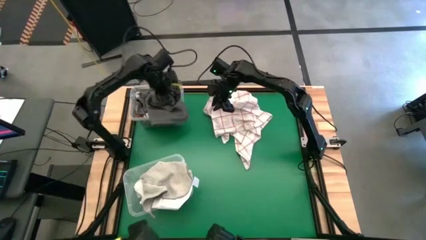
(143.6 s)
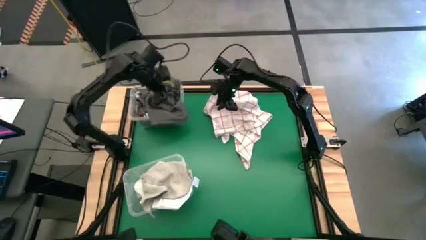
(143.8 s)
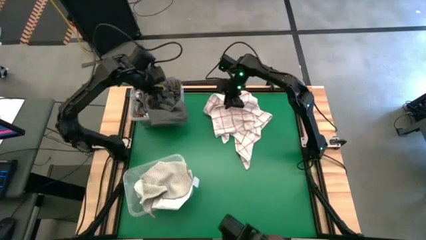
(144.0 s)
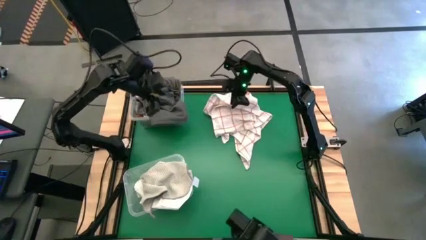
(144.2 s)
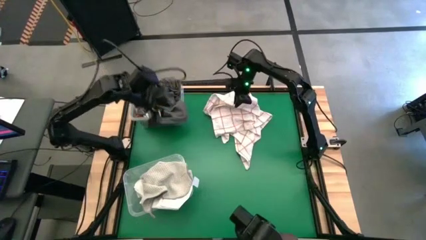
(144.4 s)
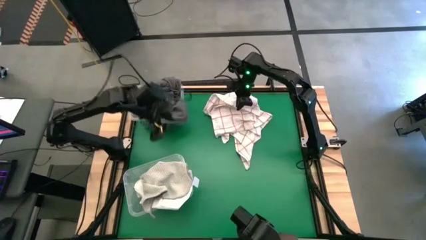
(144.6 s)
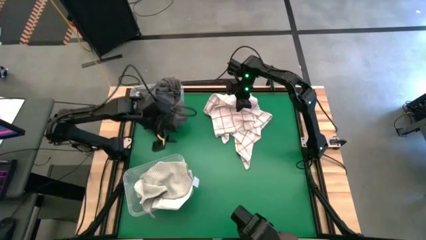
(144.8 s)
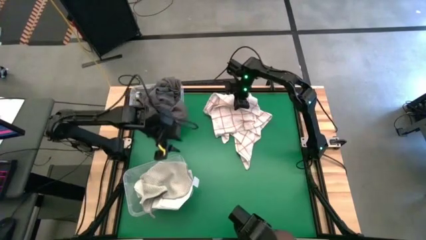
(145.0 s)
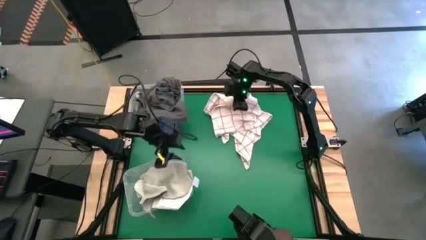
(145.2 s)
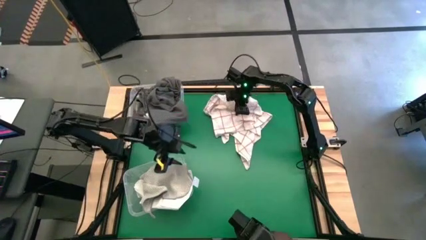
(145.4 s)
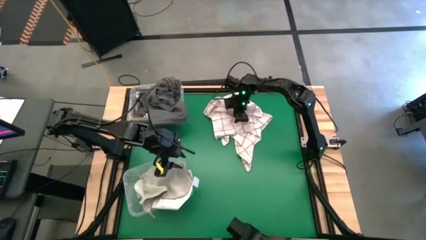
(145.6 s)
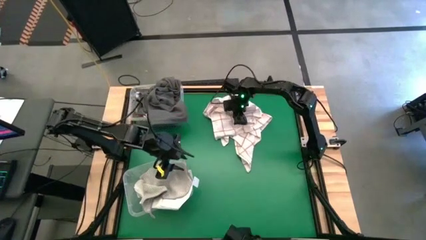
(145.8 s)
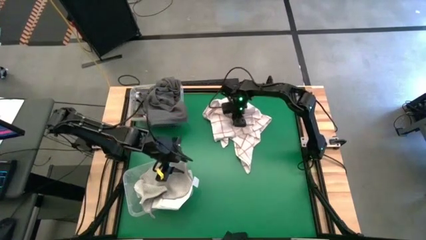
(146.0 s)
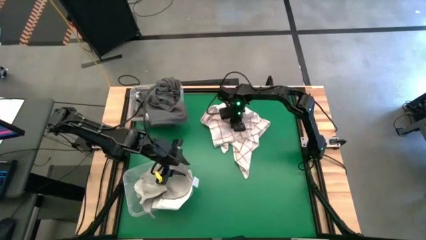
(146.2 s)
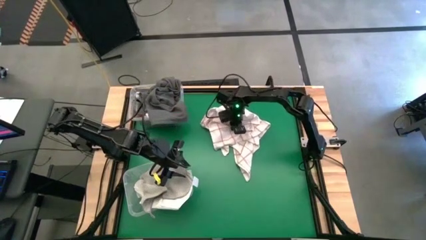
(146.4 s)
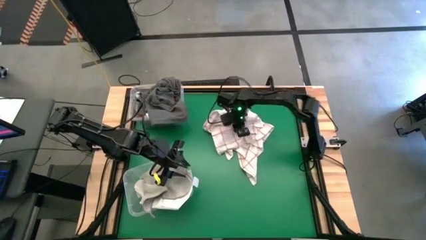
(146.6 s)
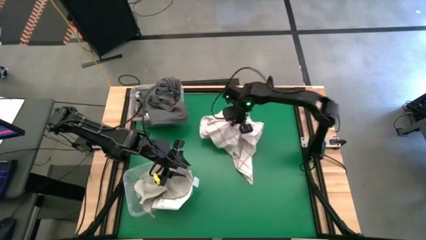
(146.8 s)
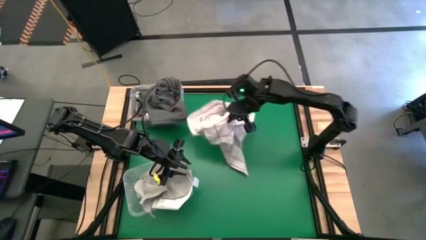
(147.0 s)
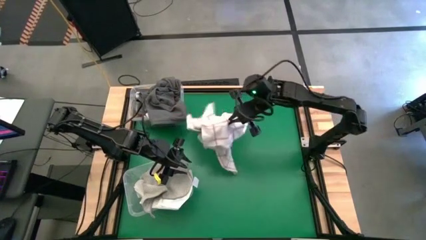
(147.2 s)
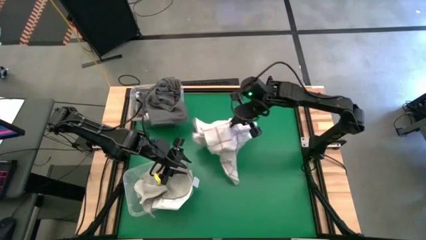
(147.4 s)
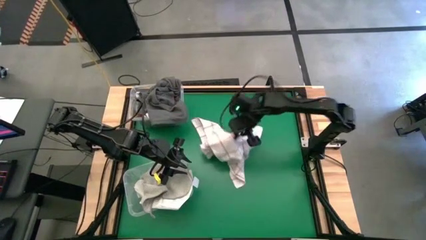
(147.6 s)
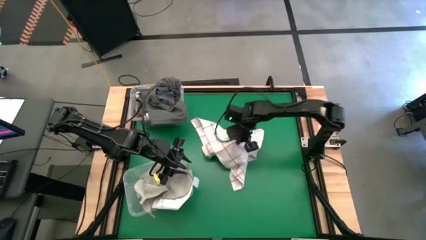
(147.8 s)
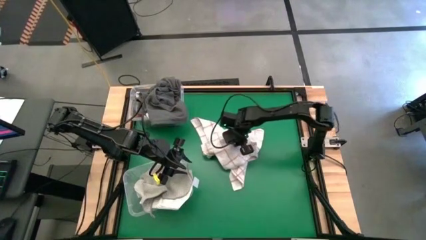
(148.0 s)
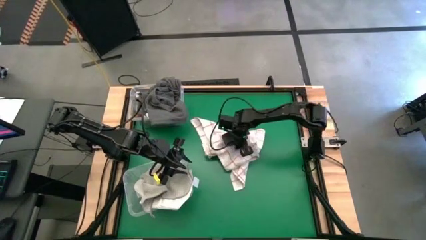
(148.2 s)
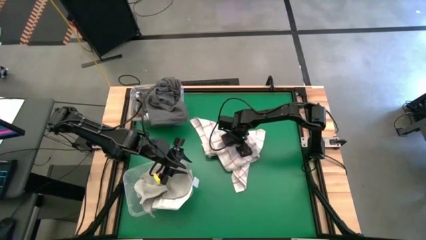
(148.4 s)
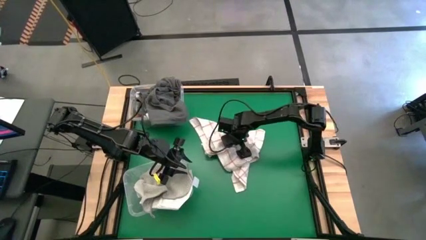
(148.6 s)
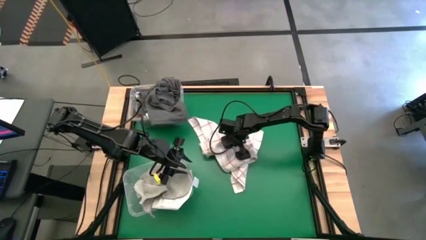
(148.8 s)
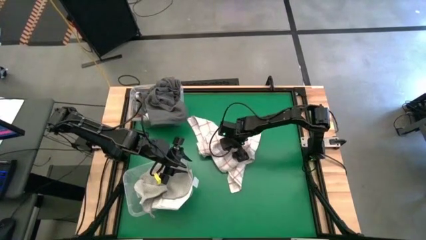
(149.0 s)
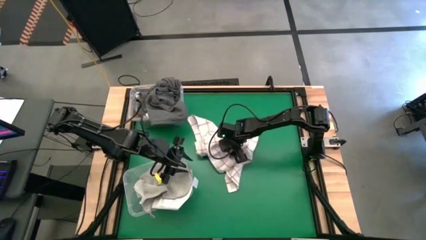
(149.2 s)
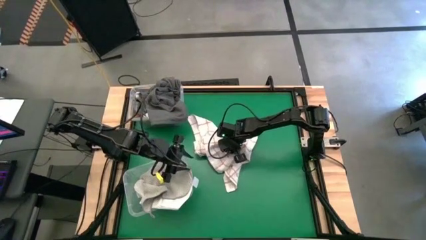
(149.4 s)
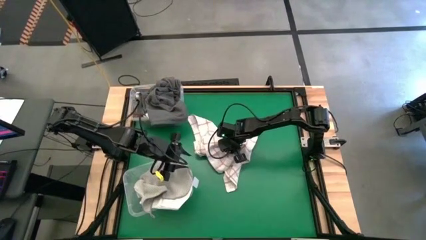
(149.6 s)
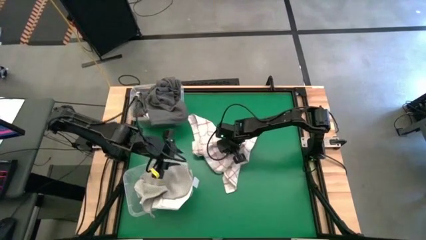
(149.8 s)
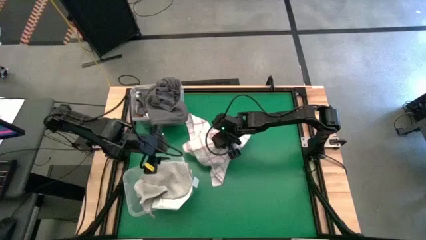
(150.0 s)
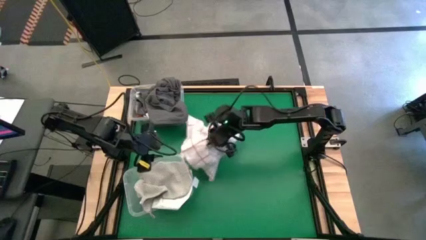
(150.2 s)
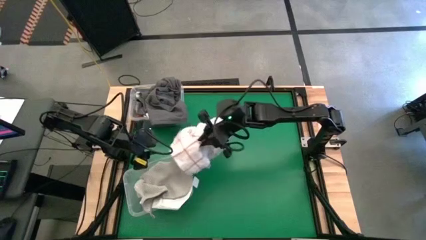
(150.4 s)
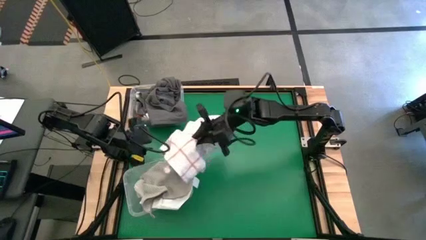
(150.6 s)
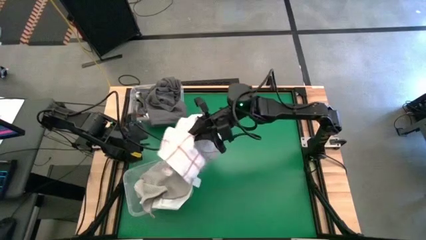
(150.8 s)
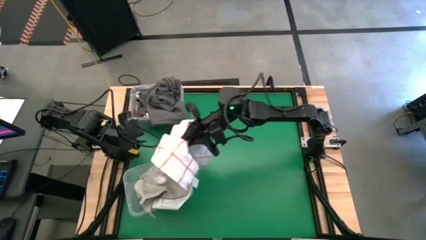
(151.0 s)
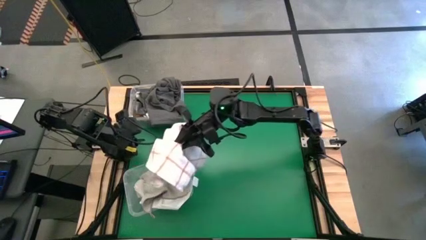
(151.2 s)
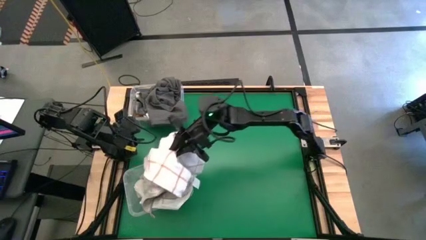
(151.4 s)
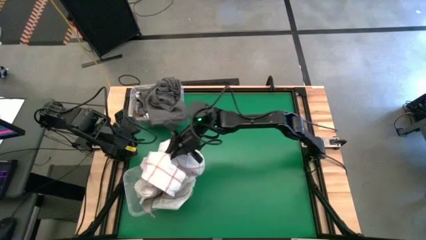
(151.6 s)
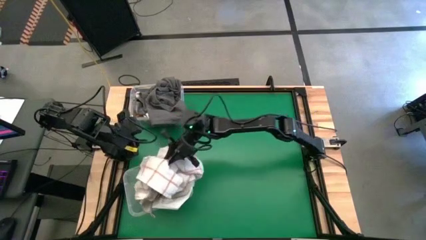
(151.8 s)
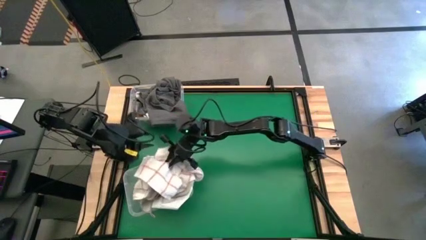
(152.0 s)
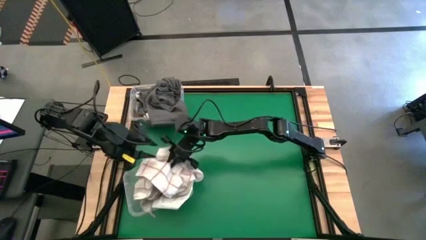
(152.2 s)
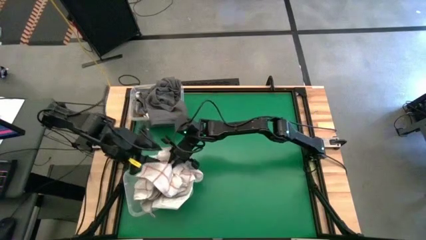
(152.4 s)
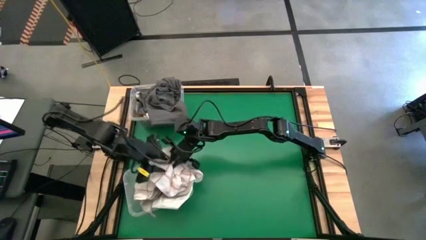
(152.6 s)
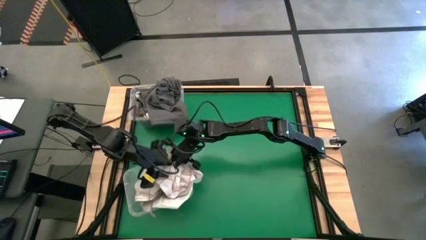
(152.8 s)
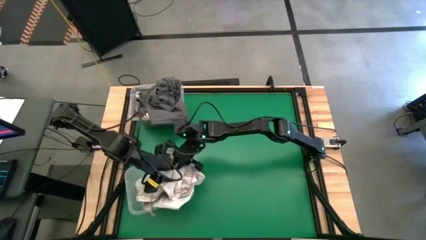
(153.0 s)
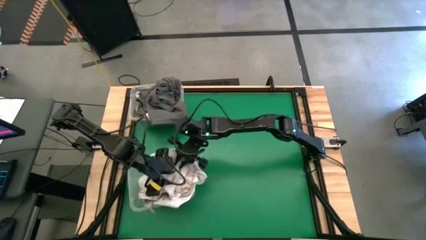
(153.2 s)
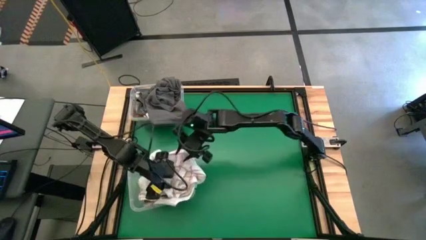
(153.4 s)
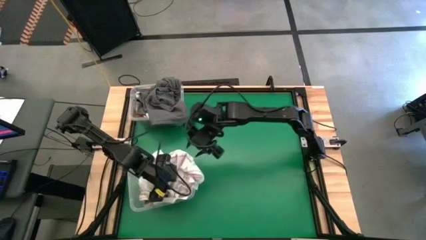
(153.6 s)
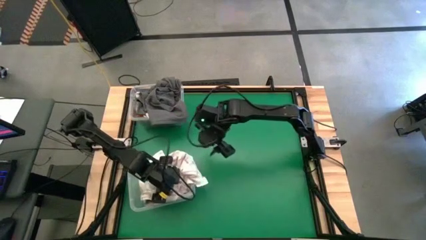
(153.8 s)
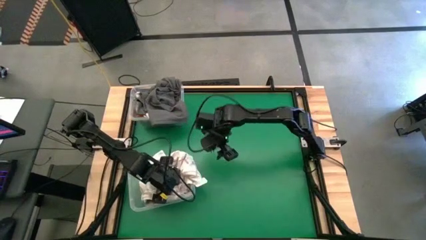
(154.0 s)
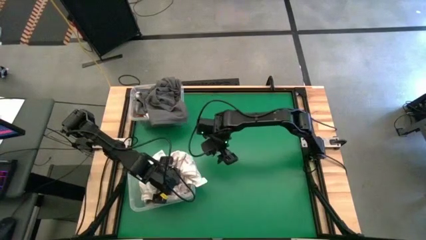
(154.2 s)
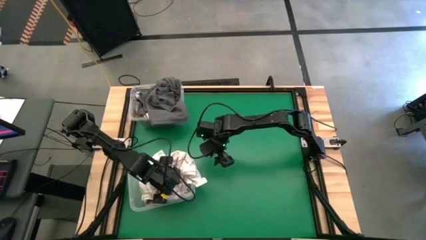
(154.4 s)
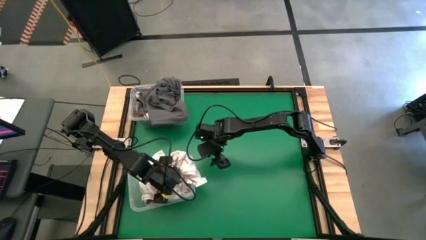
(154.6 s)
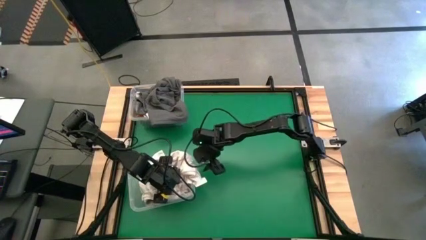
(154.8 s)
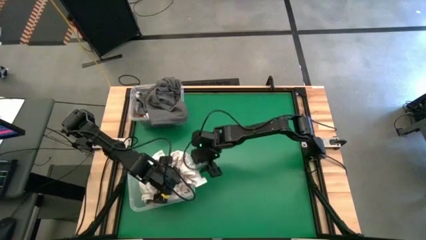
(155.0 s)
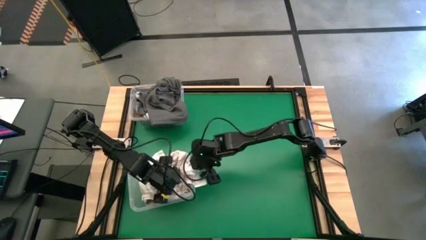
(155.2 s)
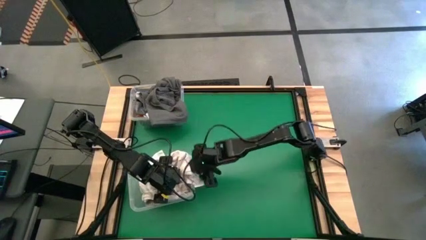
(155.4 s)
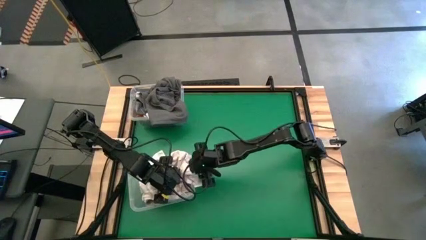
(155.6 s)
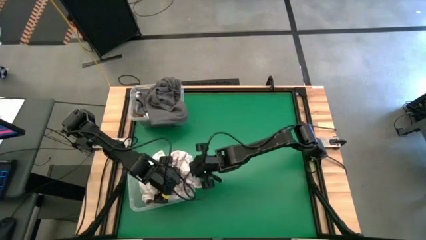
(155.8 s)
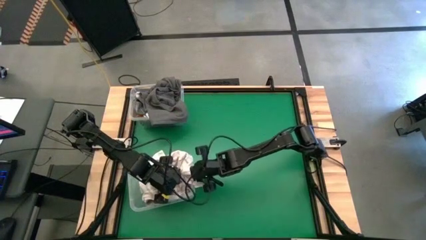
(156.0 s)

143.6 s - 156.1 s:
Task: Sort towels by color in basket
Put the white patterned towel into the bottom transparent bin

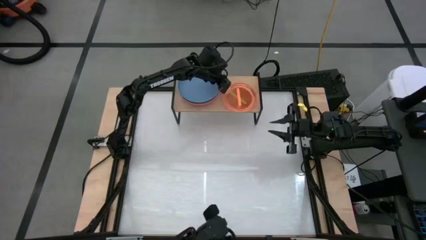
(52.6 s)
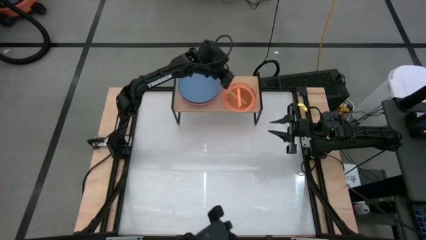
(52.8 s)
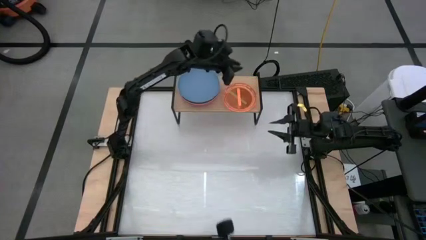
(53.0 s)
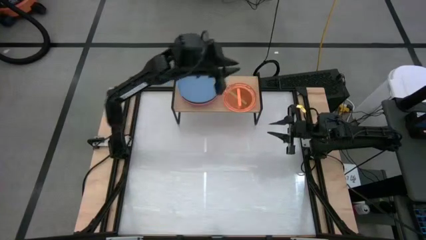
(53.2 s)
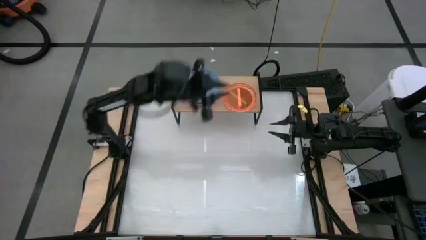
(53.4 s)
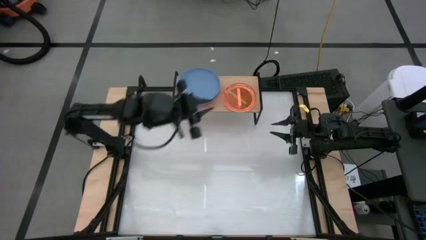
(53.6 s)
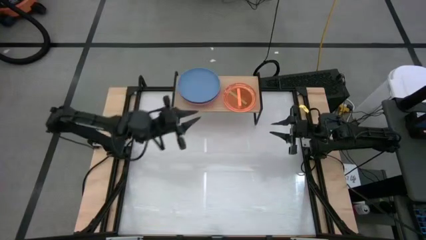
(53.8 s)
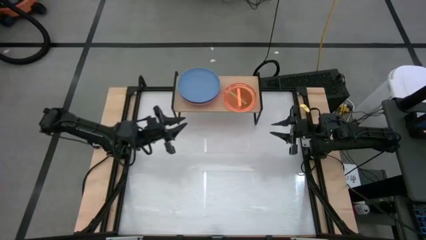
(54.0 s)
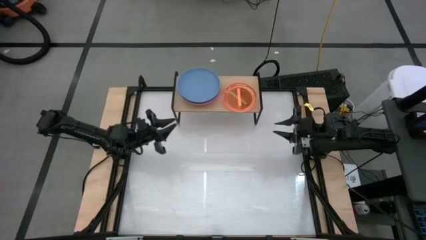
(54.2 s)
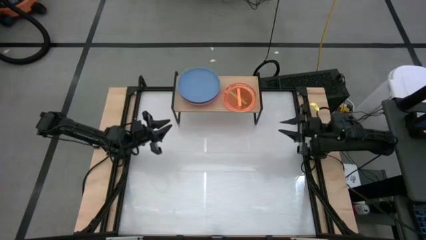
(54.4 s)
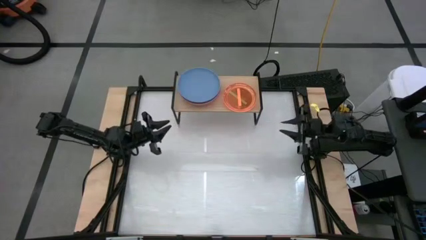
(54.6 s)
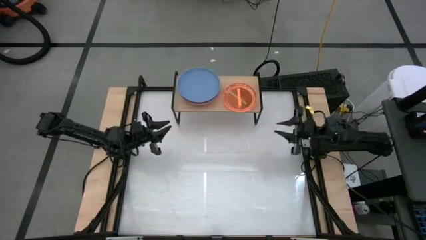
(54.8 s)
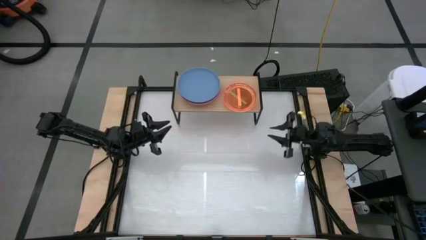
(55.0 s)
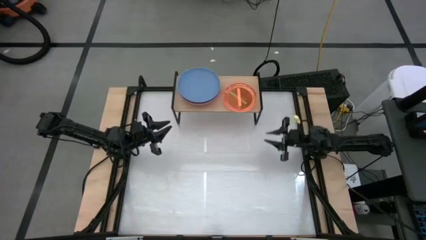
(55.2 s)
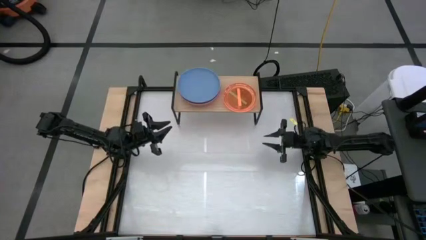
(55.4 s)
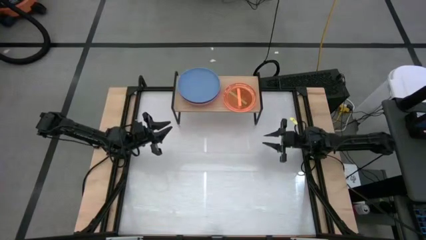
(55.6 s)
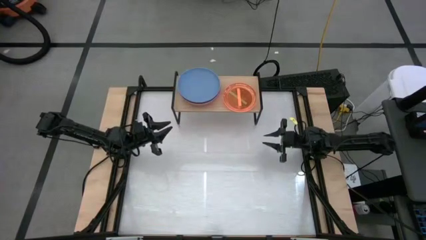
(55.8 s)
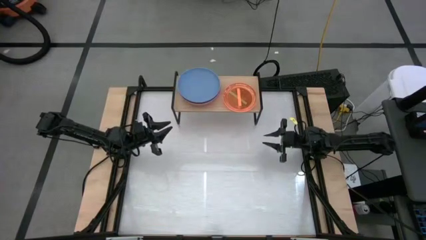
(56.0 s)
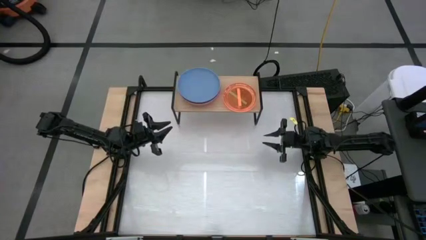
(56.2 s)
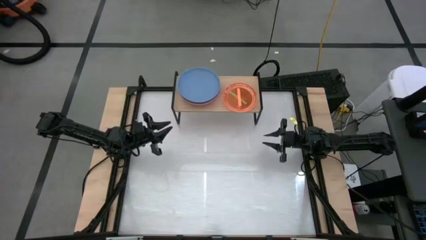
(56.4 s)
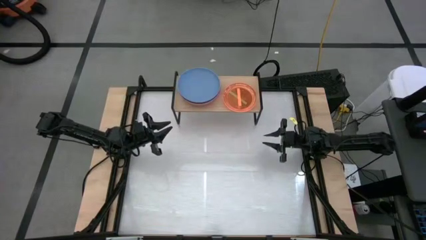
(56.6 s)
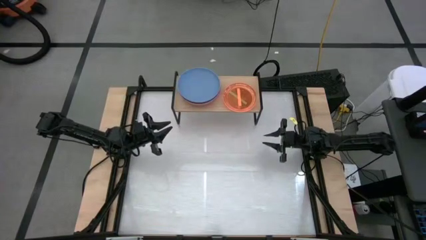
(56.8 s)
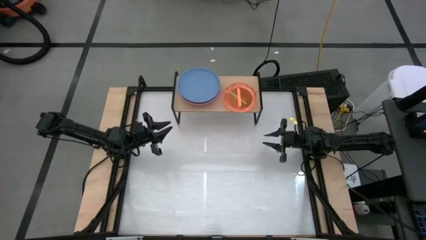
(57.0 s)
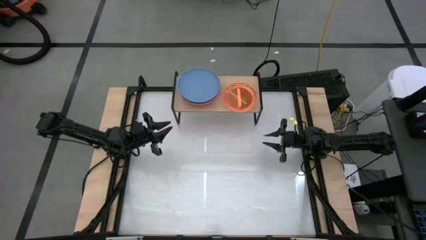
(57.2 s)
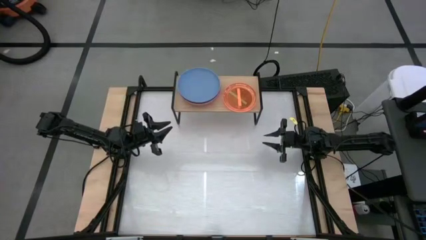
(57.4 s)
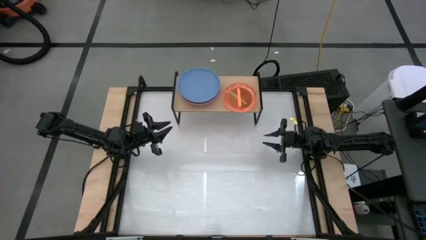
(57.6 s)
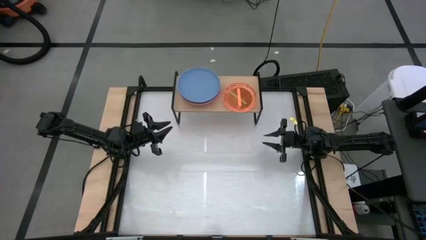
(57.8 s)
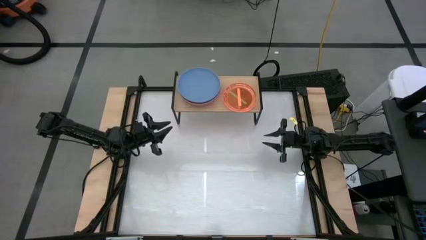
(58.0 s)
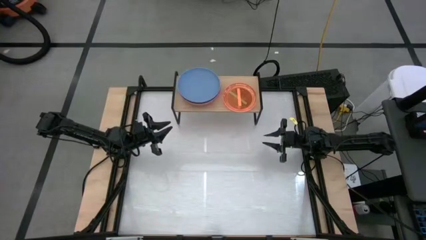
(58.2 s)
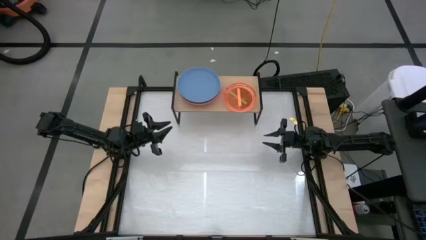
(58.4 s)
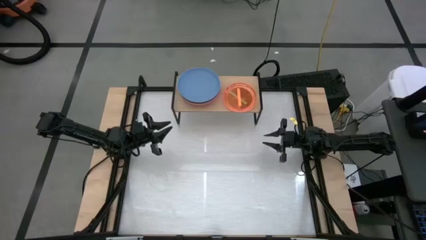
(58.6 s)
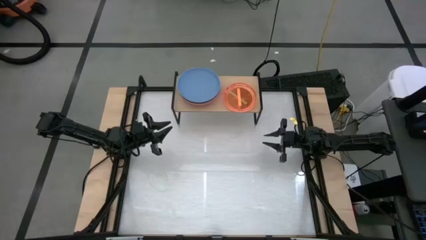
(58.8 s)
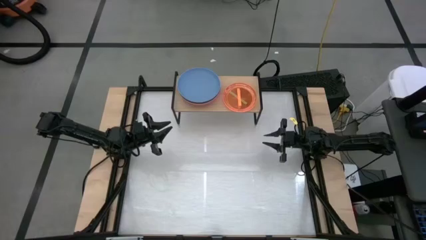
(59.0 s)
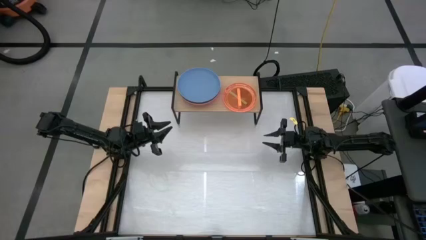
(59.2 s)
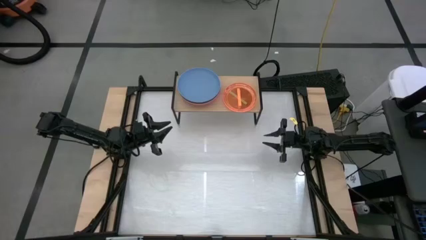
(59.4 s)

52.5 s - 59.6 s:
Task: Place and stack plates onto a shelf
Return to Home Position
